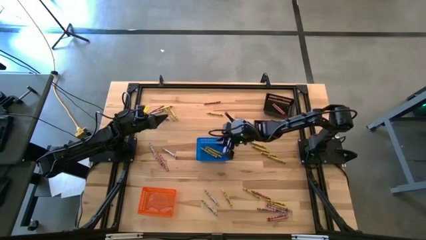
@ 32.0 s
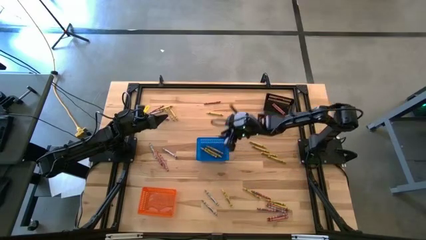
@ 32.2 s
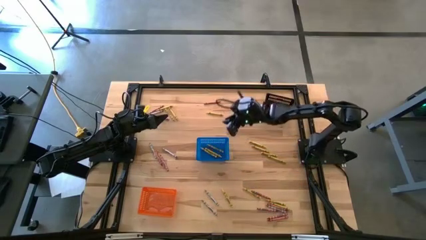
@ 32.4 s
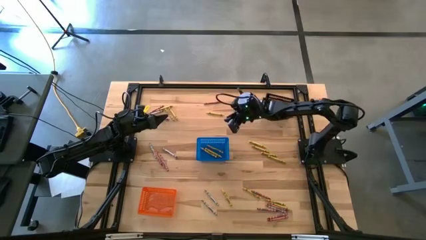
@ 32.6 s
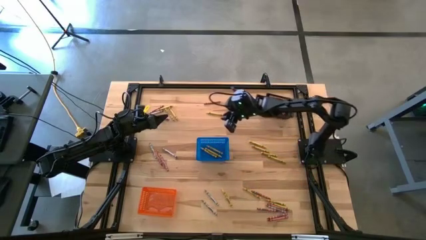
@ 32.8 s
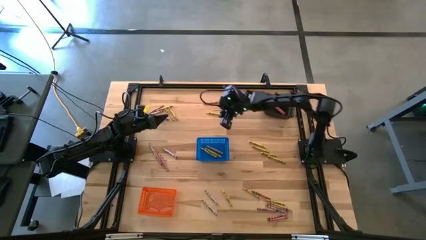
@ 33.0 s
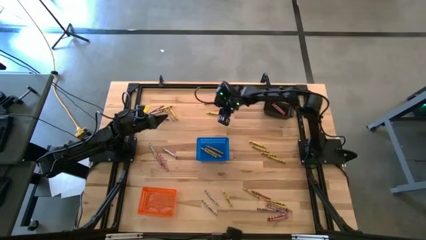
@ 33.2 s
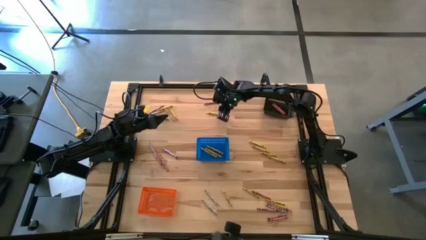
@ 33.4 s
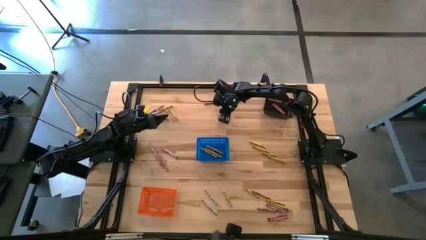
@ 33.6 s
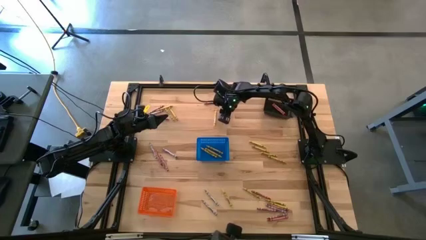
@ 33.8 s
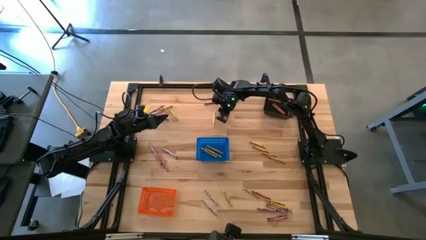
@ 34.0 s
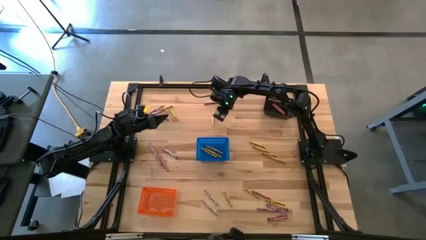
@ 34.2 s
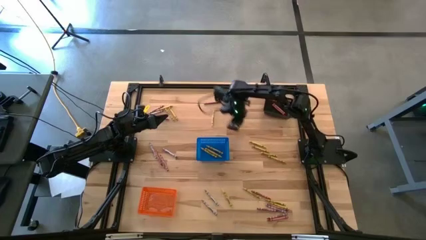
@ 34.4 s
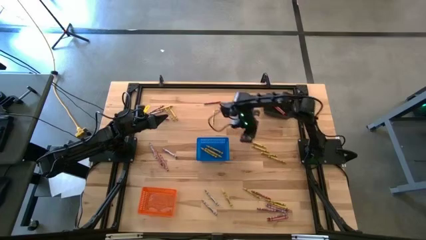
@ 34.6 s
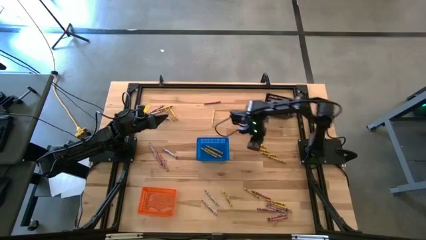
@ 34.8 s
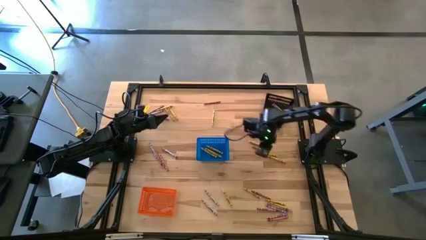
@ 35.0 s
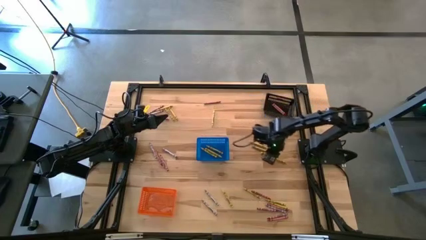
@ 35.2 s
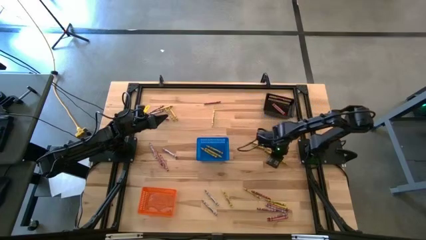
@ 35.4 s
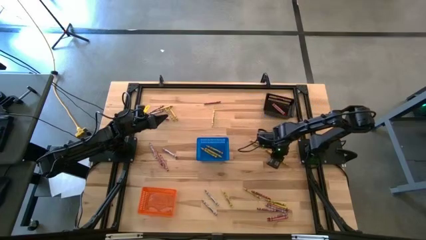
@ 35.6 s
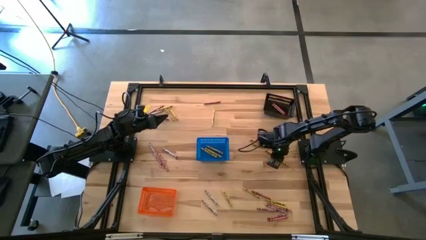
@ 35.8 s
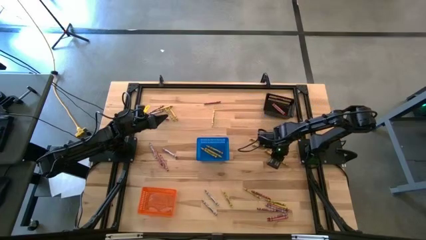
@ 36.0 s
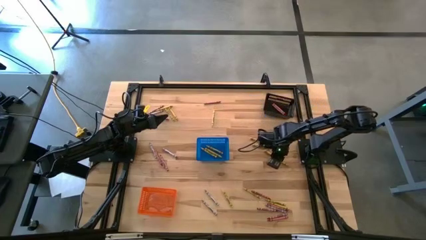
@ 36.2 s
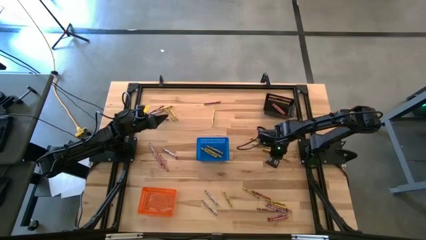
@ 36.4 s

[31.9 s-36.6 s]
Task: Sort crayons
Put the yellow crayon into the blue basket

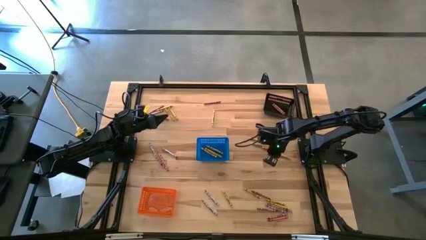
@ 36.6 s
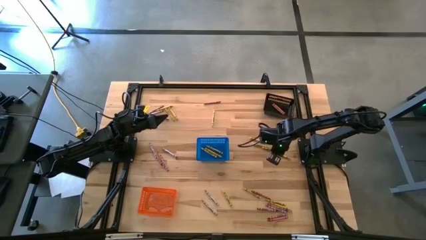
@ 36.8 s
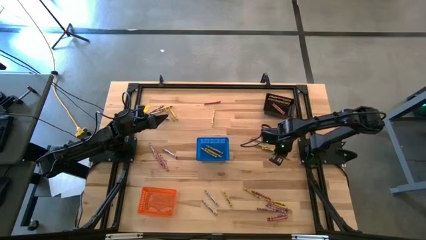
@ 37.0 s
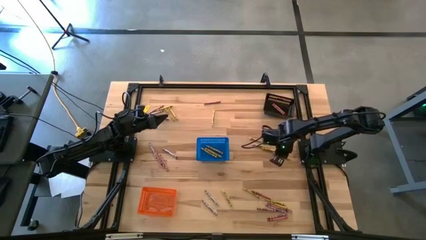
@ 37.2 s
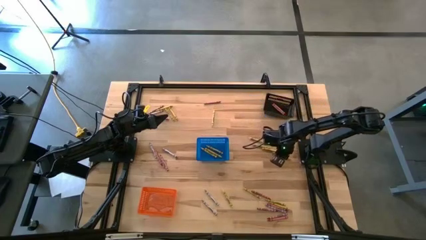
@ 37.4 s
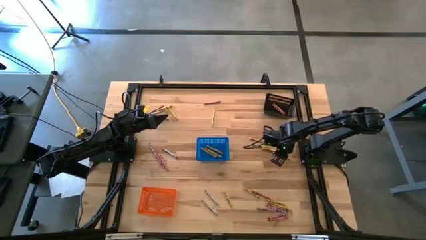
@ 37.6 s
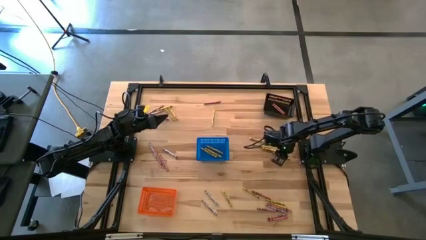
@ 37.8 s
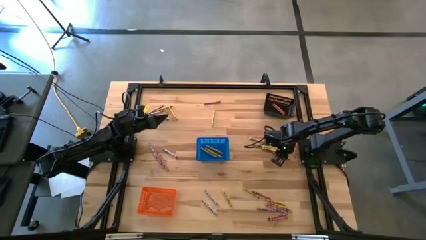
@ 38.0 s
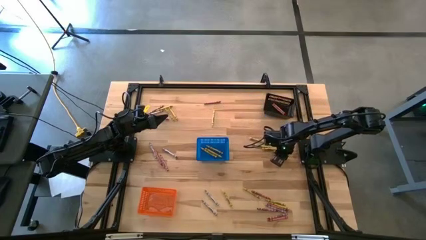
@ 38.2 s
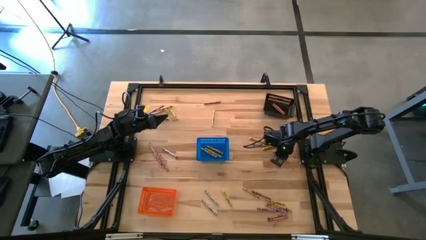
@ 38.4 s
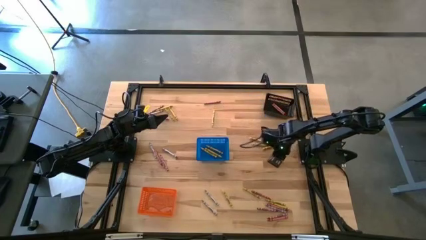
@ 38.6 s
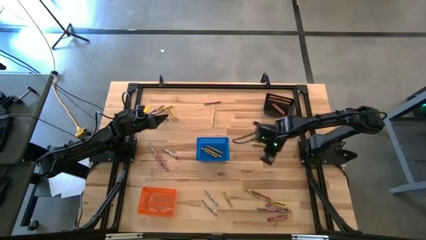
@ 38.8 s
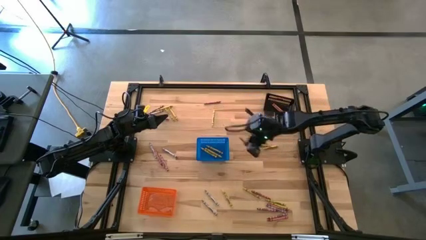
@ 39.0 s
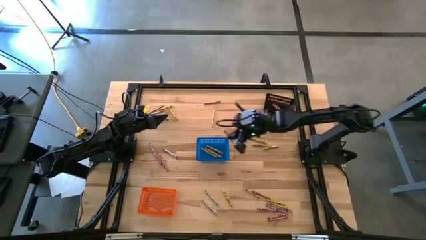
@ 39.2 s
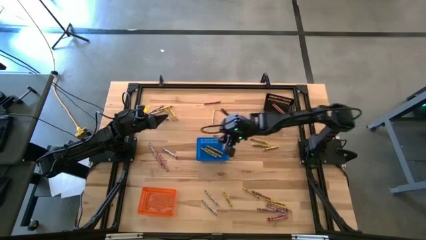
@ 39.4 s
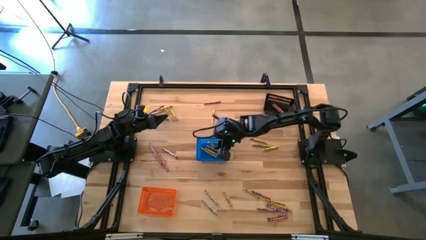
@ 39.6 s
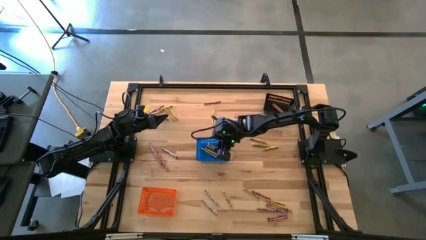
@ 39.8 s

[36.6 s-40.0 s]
Put the yellow crayon into the blue basket

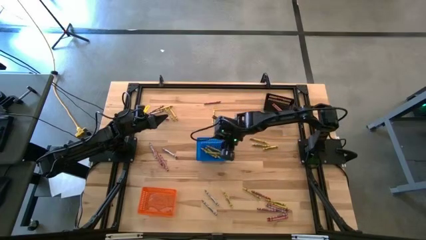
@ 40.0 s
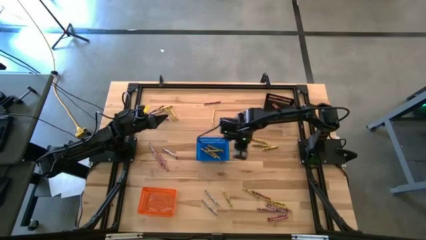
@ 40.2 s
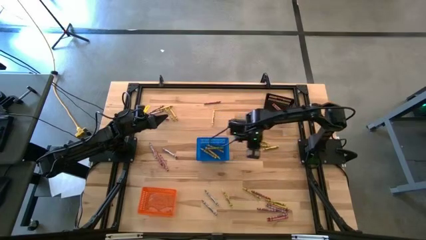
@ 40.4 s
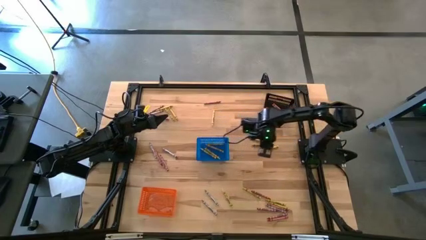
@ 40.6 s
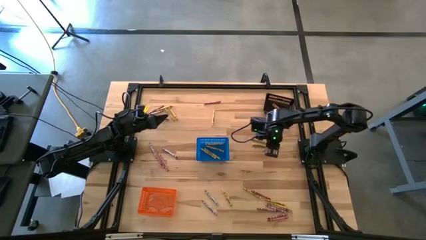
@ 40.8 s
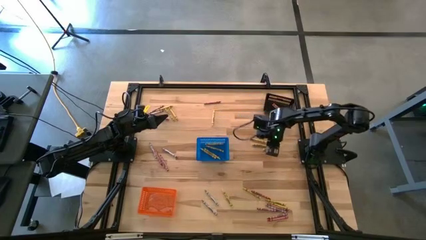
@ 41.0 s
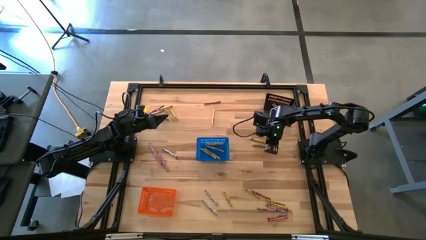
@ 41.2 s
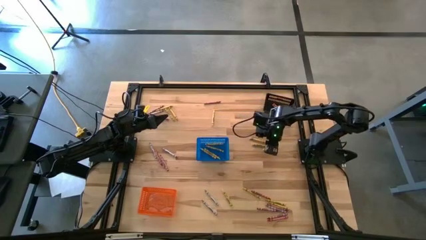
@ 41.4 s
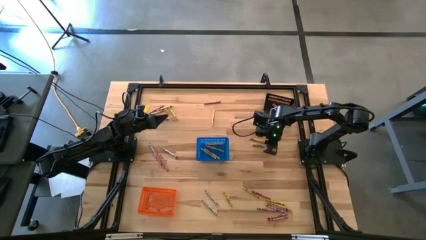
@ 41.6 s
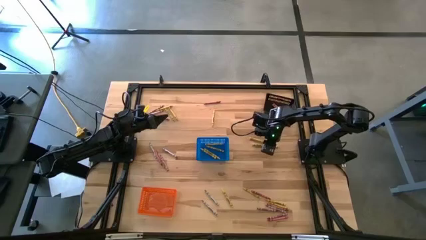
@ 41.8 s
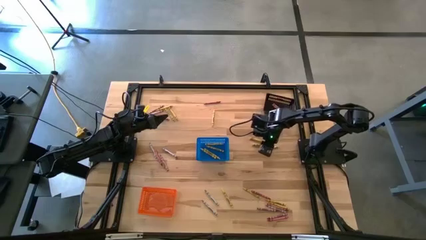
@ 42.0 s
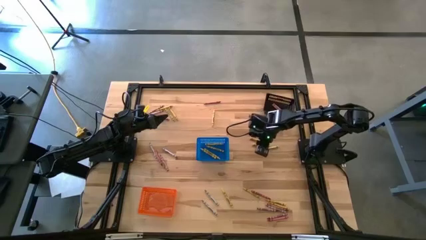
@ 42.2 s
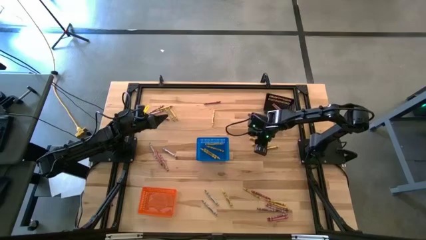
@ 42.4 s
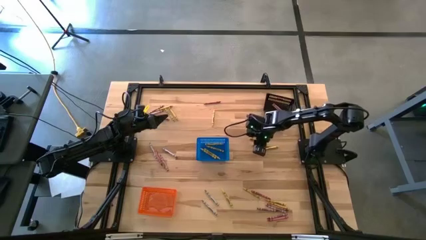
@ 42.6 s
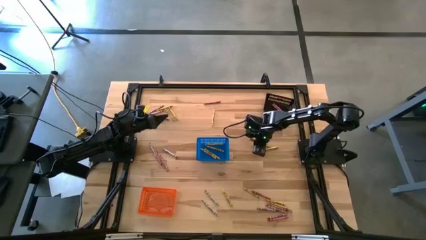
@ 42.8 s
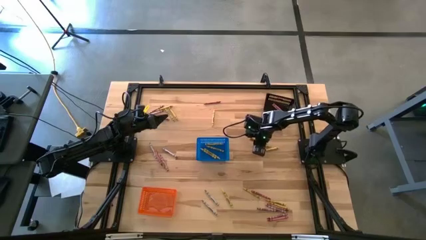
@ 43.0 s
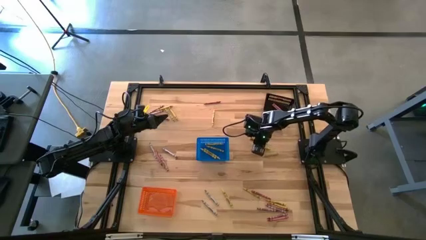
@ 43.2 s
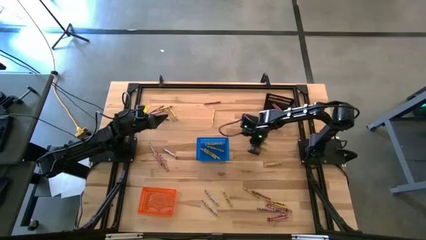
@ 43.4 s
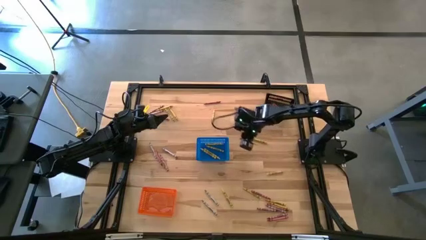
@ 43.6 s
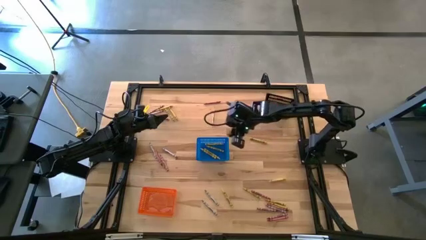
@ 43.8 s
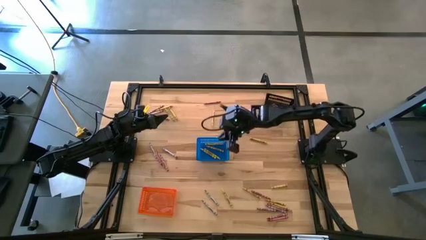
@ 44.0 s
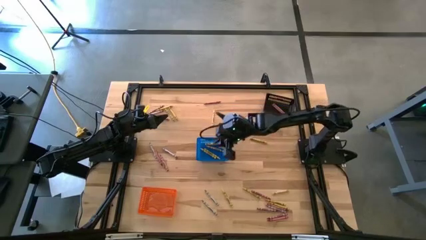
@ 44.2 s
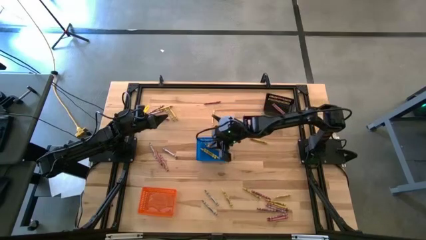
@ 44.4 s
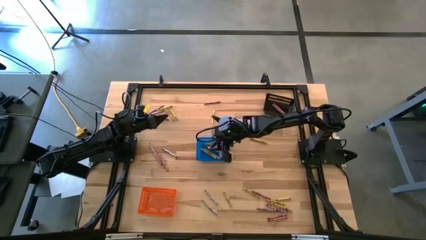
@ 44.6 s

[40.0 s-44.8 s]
Put the yellow crayon into the blue basket

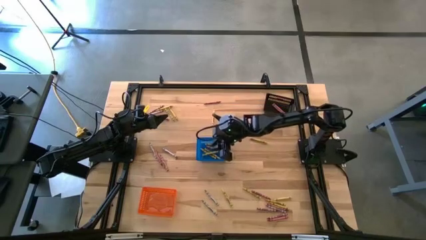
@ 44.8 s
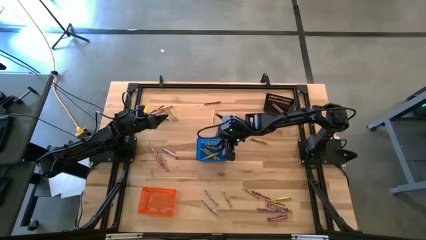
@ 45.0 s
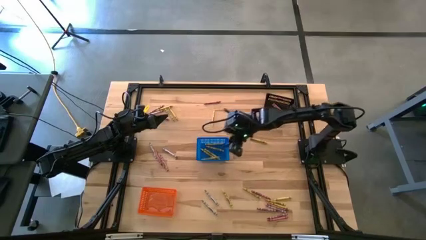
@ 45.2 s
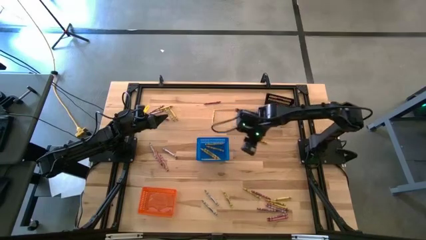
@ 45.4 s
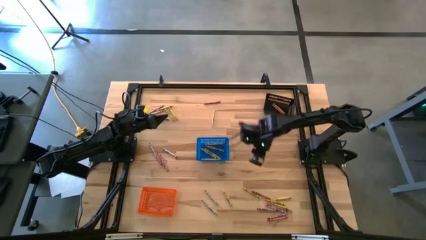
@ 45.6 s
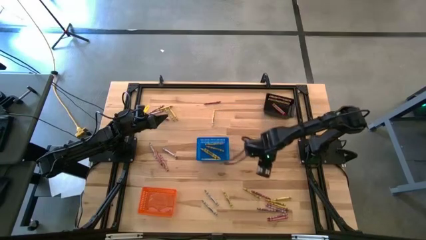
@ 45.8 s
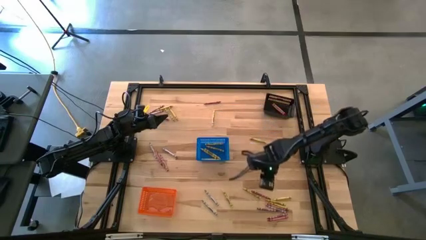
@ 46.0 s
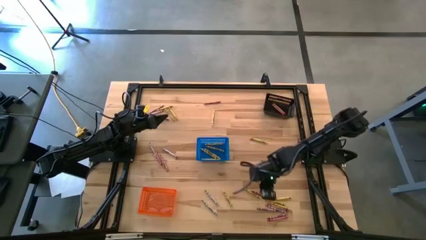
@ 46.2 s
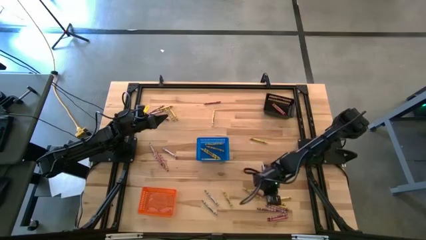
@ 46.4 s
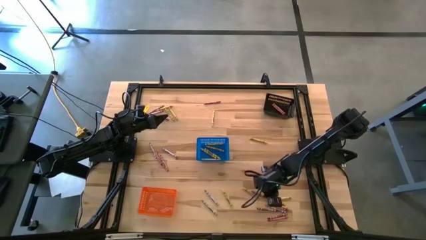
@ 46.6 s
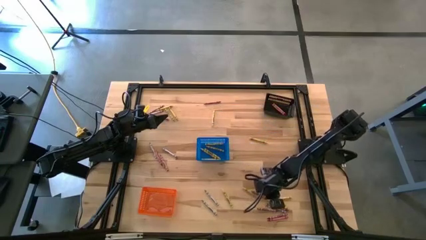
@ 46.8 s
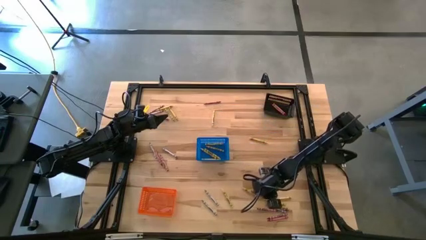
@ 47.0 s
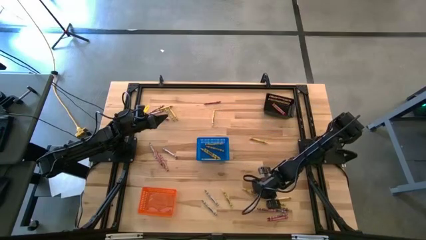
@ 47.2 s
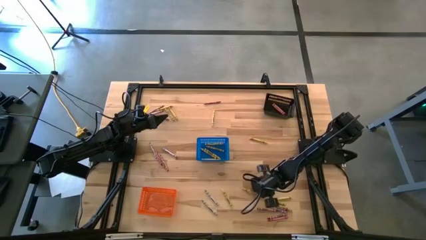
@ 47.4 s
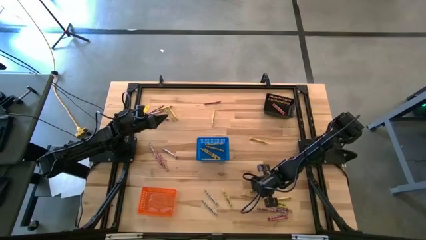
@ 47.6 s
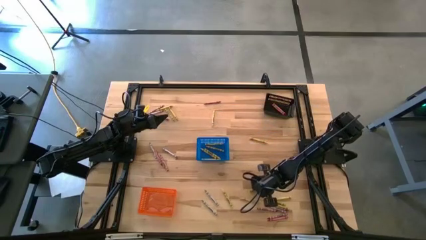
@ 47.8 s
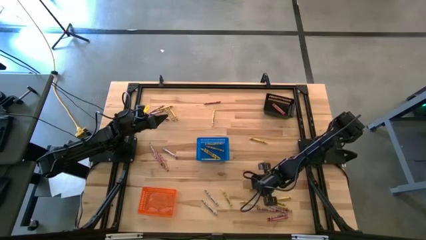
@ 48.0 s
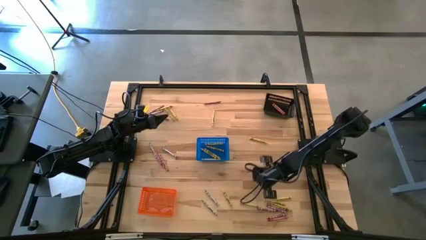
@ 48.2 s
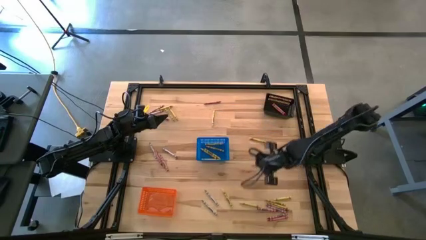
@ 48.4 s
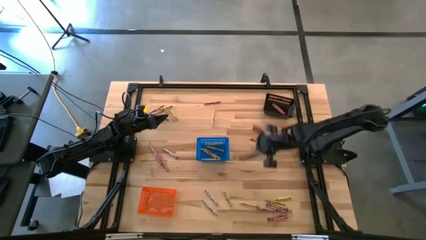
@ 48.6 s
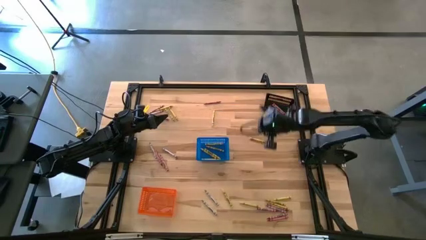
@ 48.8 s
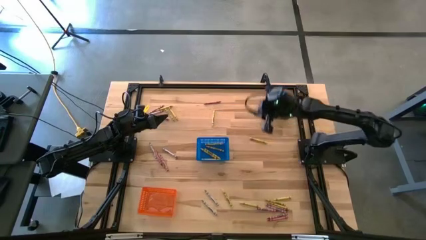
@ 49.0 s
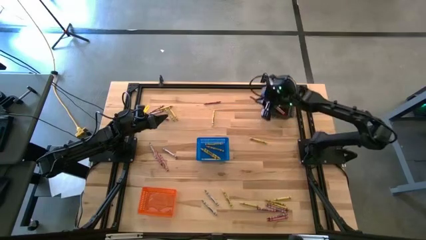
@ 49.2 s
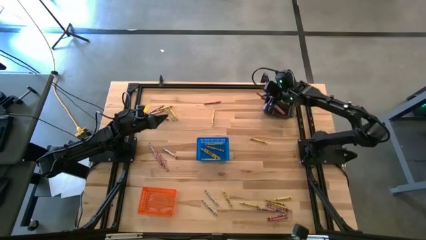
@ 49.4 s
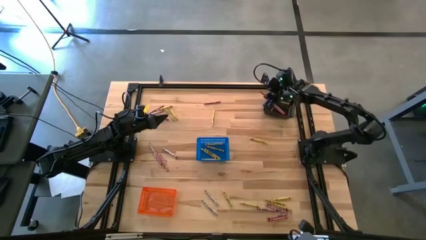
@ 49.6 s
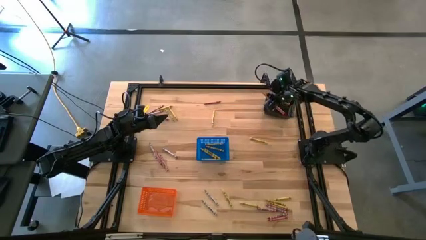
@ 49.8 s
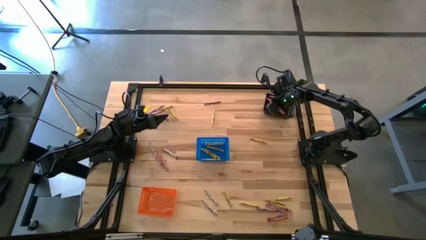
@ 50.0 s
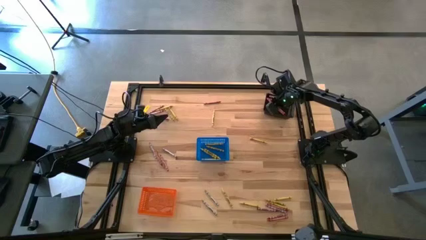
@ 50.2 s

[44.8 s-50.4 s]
Put the red crayon into the black basket
